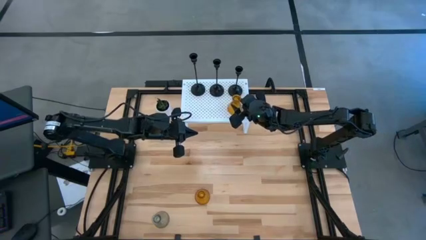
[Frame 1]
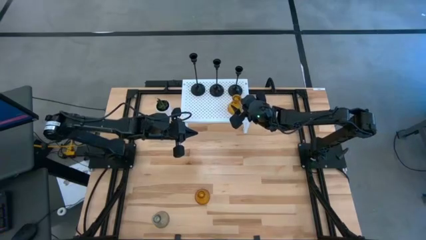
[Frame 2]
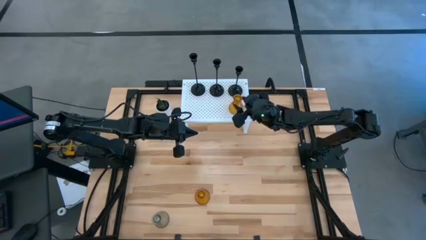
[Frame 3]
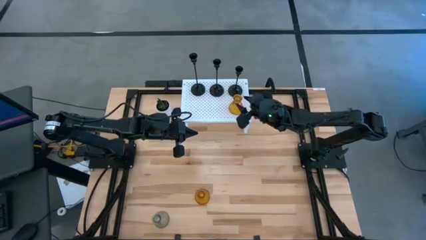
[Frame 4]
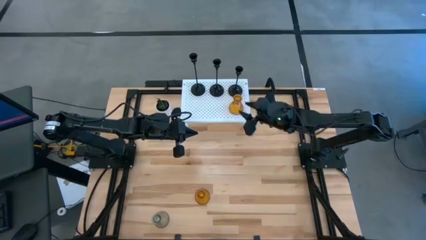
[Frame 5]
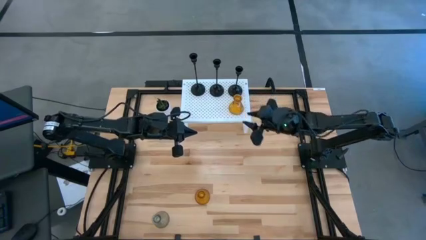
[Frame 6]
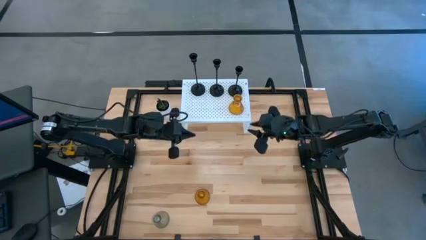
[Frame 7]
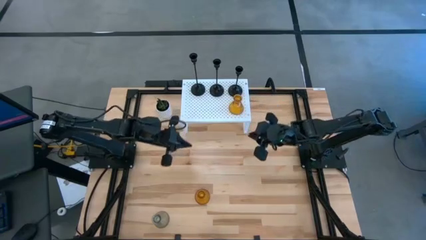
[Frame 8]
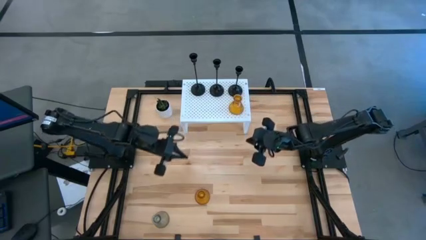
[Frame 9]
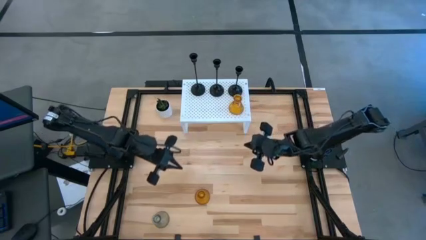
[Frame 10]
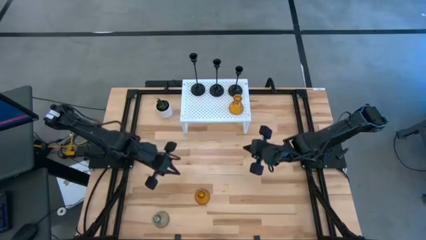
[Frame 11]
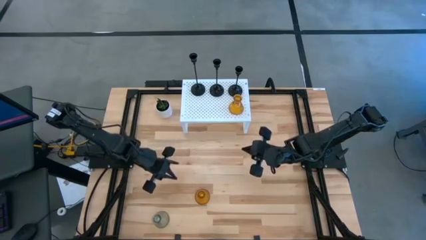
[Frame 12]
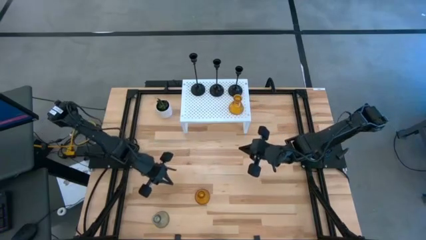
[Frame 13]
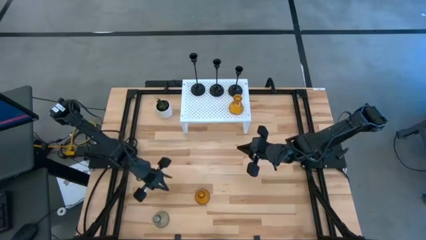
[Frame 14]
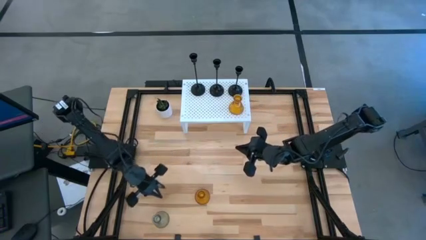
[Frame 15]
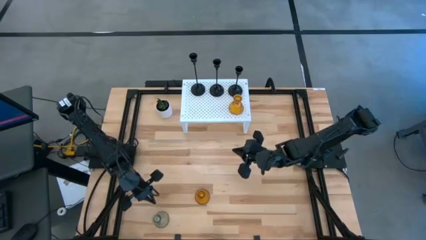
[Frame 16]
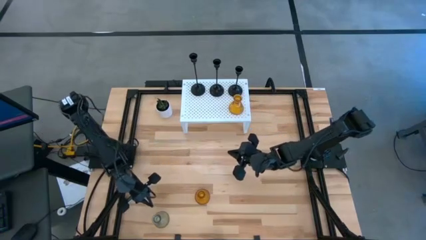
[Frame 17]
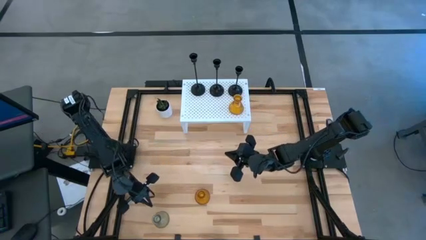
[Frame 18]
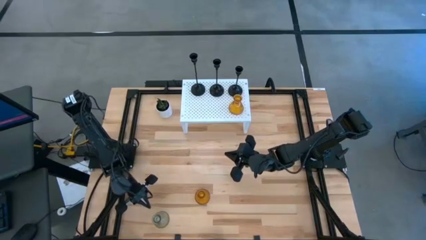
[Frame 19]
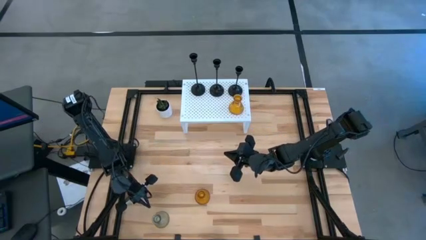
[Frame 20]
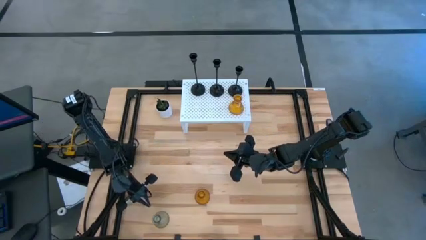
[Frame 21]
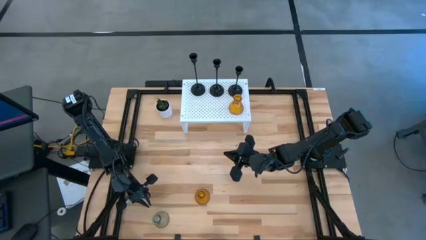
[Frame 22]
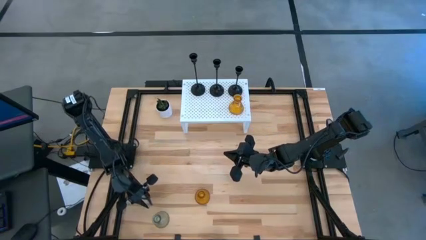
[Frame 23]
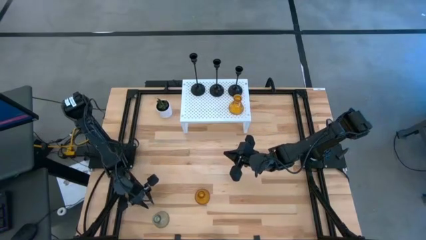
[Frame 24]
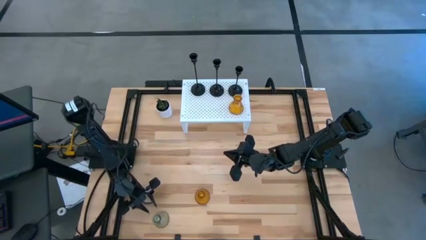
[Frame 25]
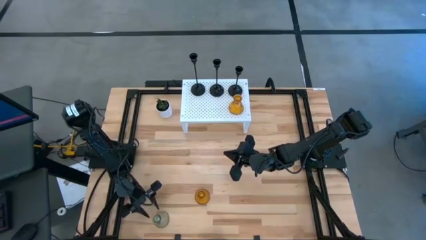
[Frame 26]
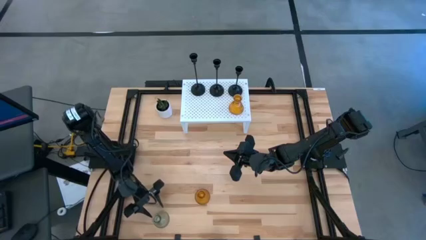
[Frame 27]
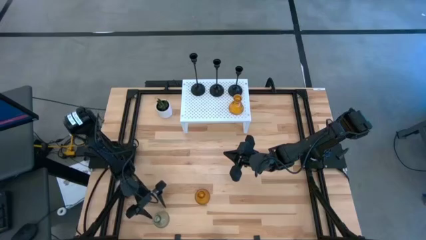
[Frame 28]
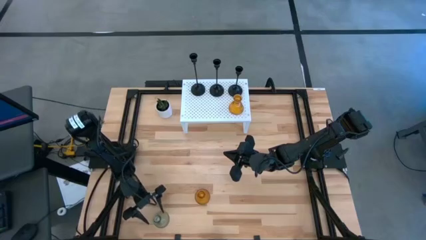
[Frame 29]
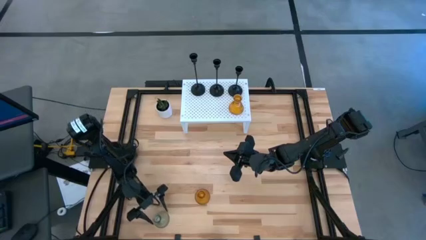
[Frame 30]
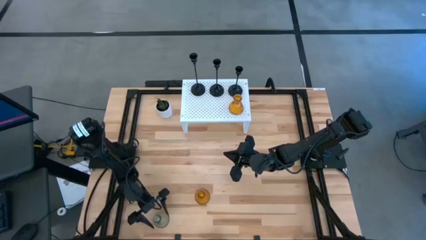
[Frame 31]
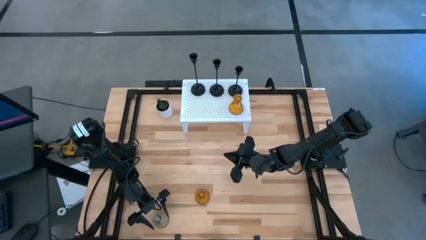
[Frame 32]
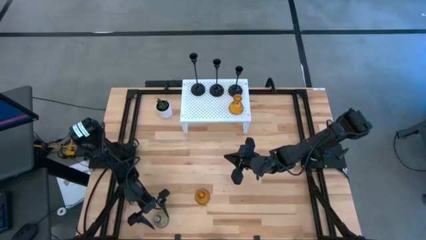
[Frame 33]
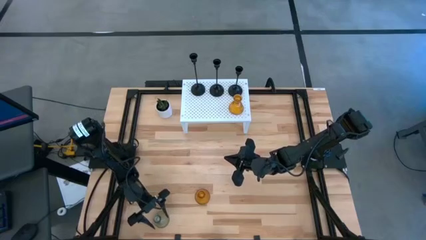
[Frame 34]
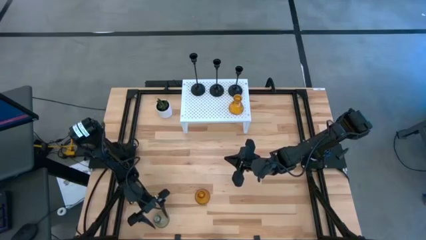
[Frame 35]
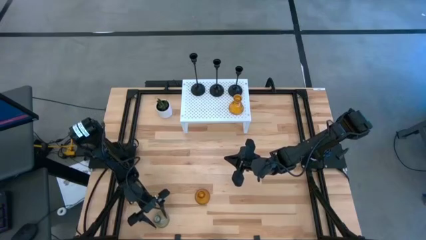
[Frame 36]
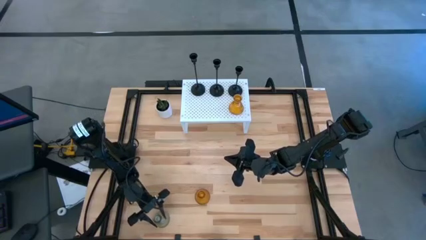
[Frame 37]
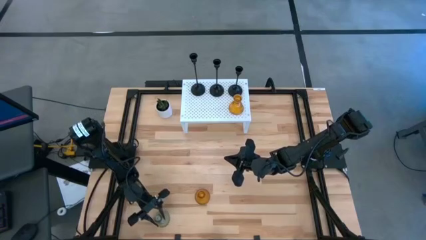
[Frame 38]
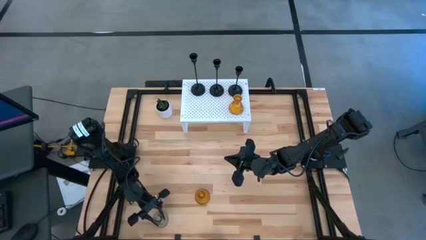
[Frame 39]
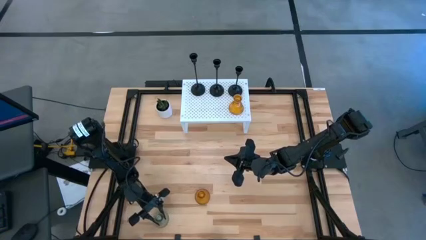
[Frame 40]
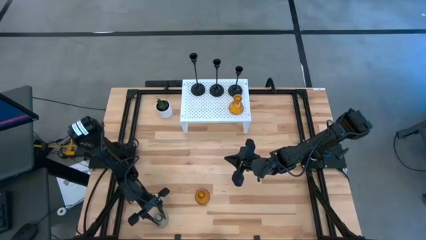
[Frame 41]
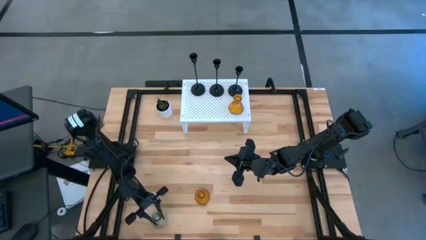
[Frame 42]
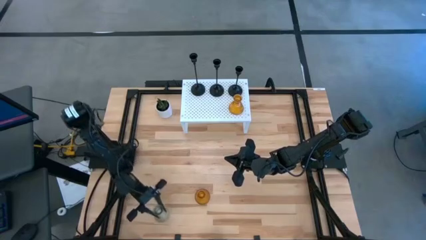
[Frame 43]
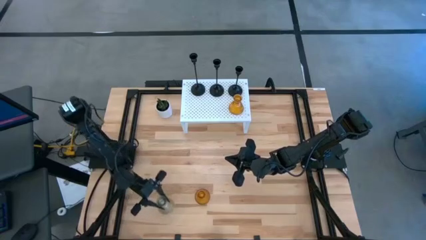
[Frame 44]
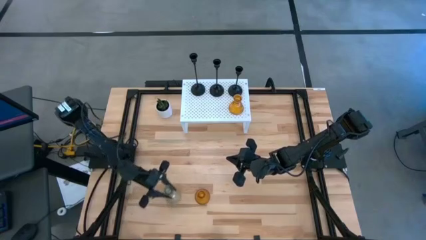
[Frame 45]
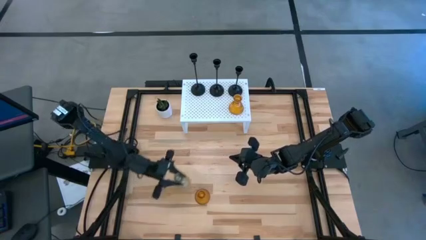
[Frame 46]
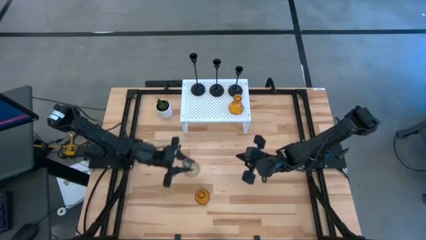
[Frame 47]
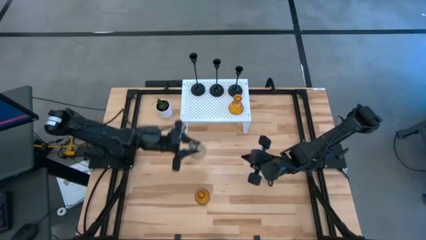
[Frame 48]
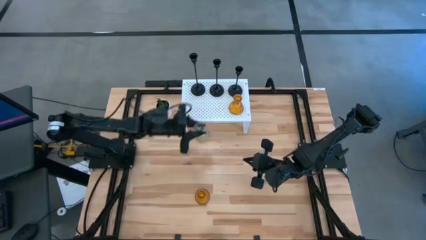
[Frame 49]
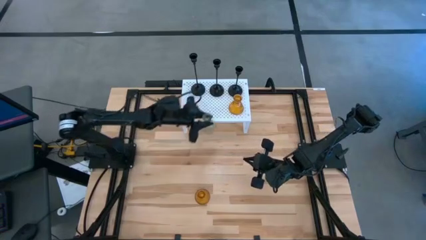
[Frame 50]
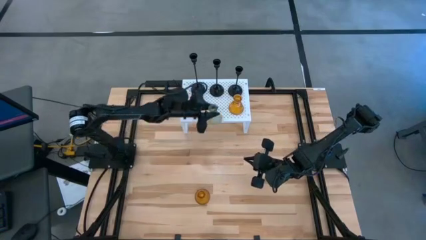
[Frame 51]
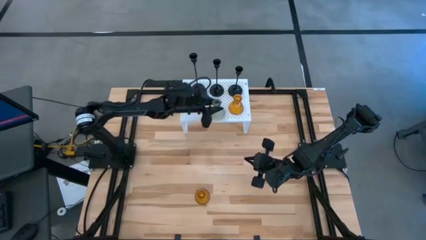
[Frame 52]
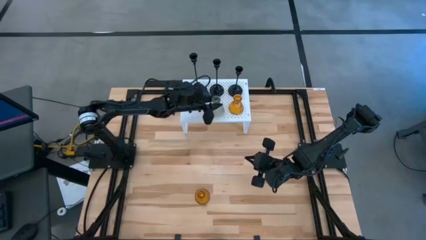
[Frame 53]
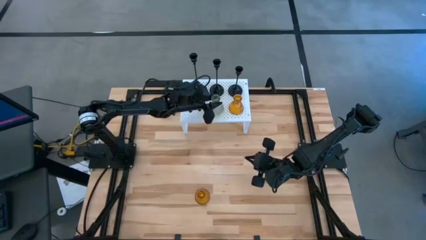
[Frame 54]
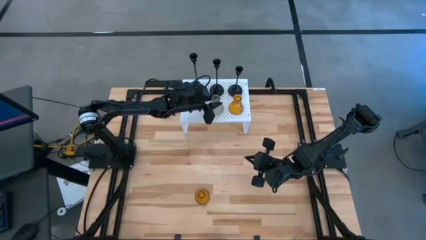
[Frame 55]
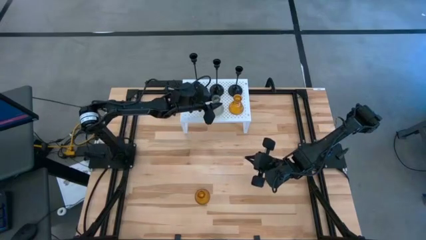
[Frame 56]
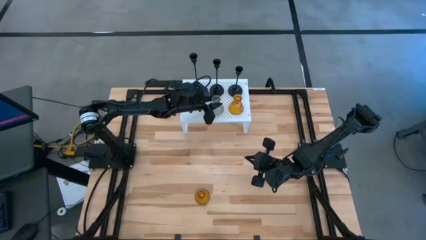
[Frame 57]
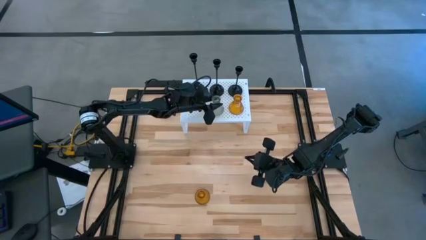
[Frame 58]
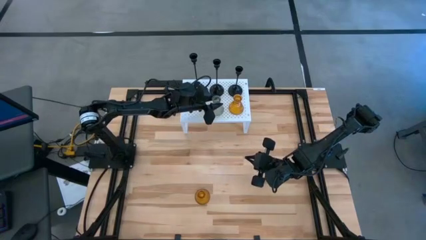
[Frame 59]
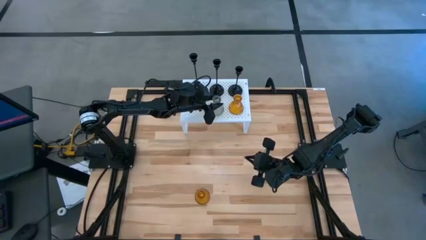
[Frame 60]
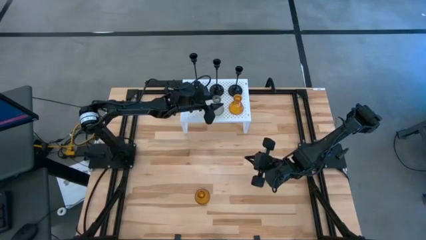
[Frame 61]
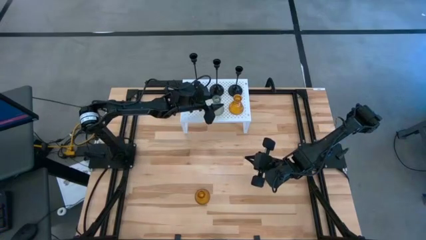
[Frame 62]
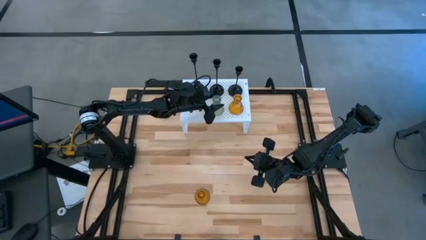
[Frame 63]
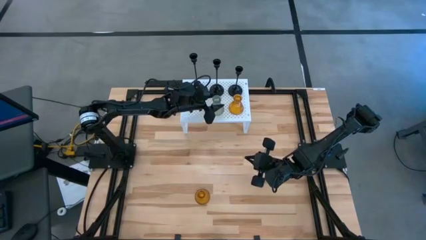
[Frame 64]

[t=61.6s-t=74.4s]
Task: Pick & Place candle stick holders
Put the green glass candle holder on the shelf aligned with the other yellow glass candle holder
